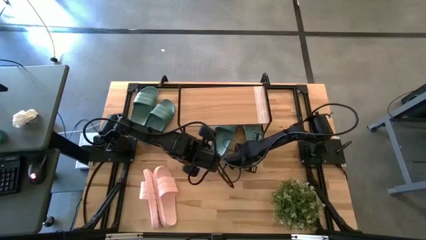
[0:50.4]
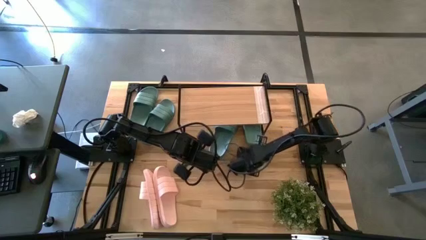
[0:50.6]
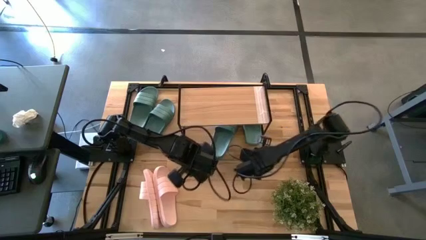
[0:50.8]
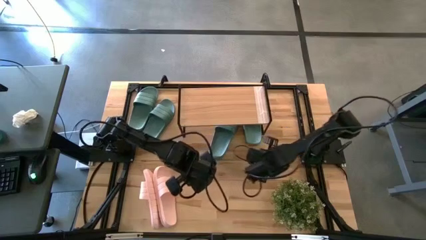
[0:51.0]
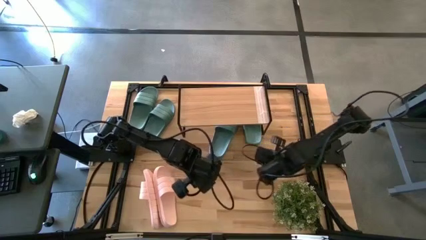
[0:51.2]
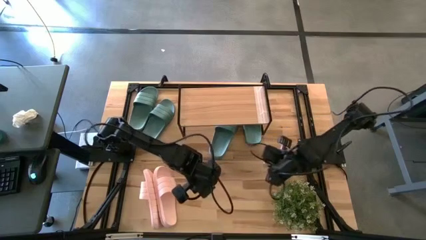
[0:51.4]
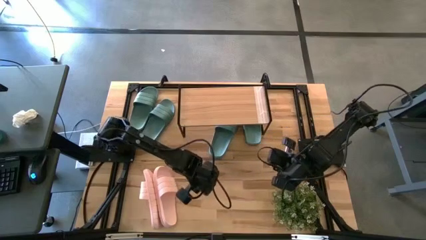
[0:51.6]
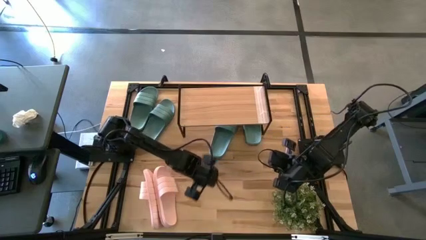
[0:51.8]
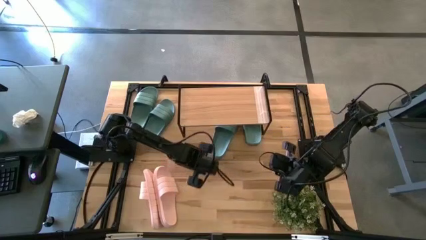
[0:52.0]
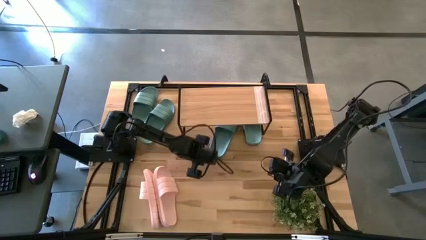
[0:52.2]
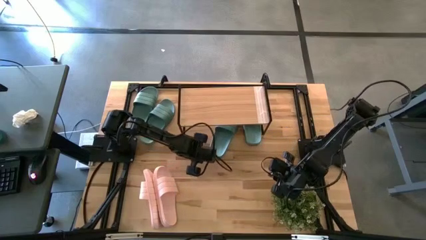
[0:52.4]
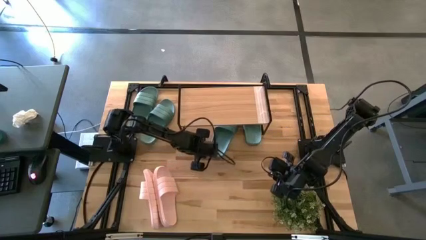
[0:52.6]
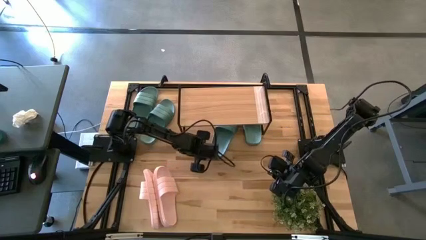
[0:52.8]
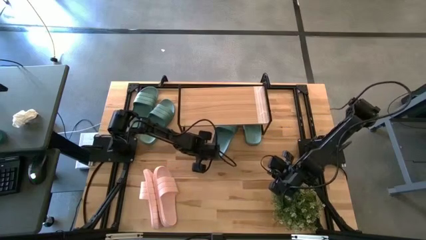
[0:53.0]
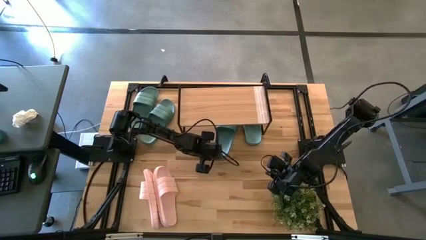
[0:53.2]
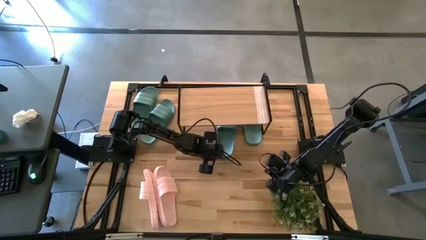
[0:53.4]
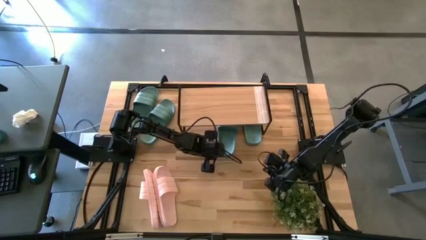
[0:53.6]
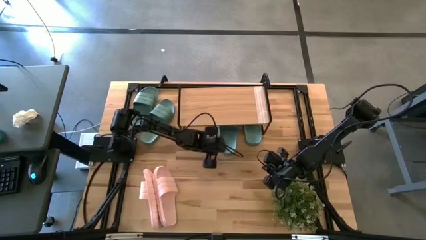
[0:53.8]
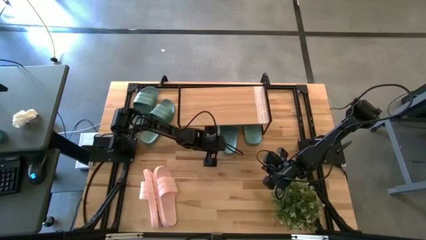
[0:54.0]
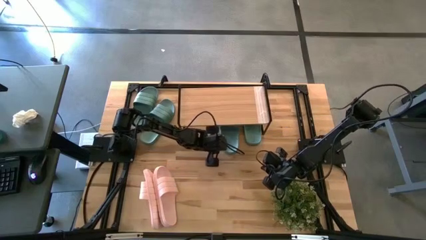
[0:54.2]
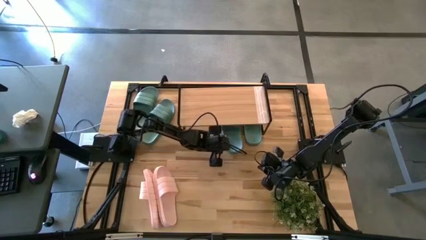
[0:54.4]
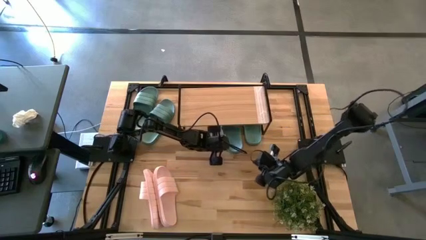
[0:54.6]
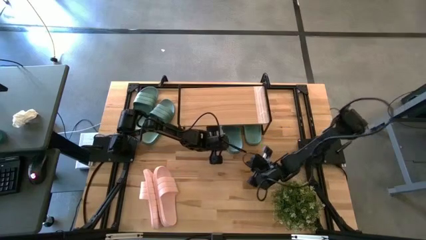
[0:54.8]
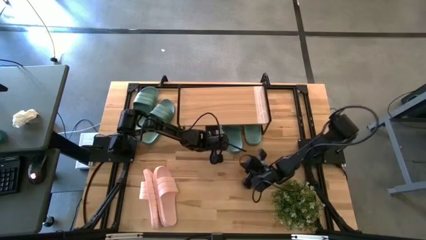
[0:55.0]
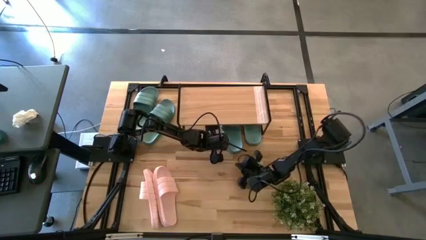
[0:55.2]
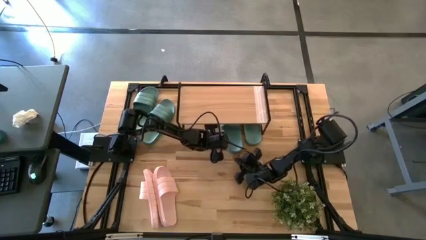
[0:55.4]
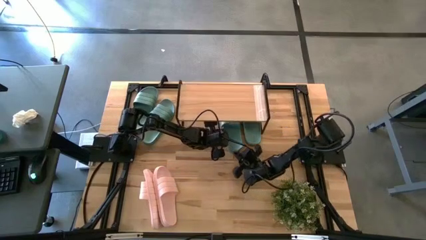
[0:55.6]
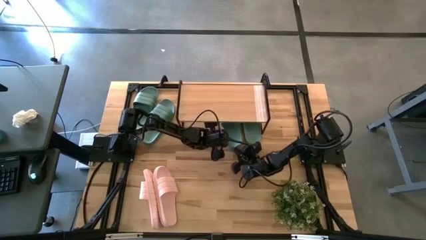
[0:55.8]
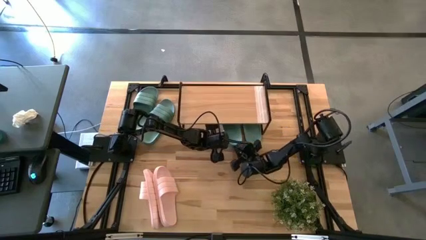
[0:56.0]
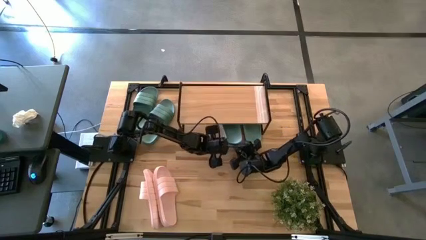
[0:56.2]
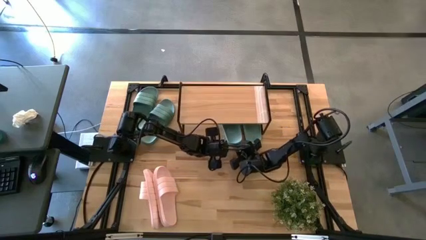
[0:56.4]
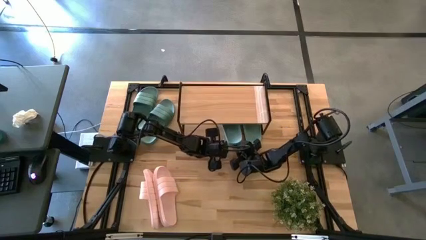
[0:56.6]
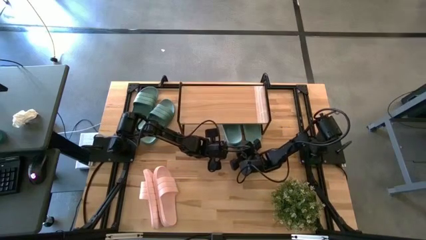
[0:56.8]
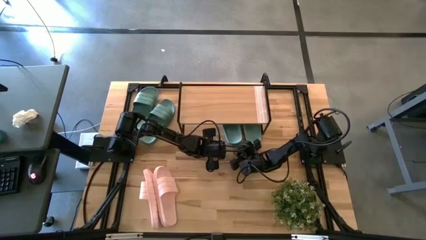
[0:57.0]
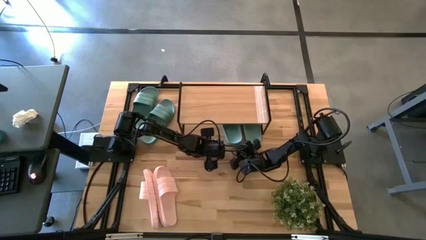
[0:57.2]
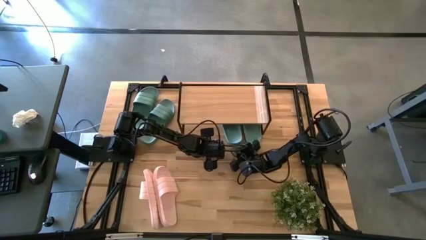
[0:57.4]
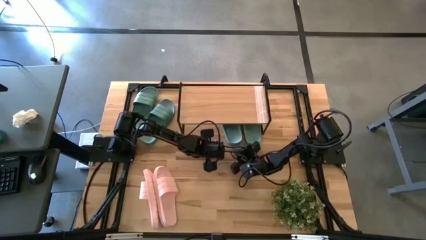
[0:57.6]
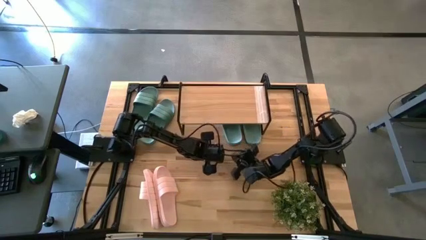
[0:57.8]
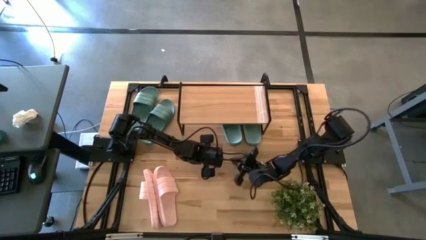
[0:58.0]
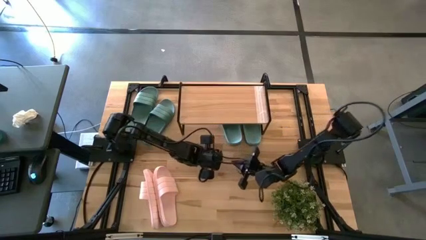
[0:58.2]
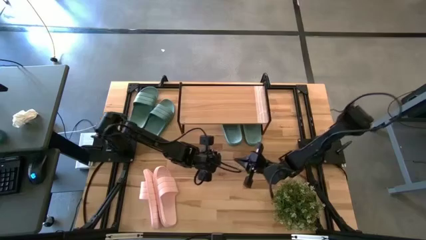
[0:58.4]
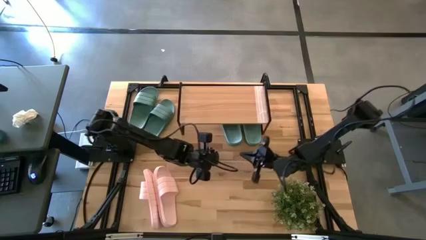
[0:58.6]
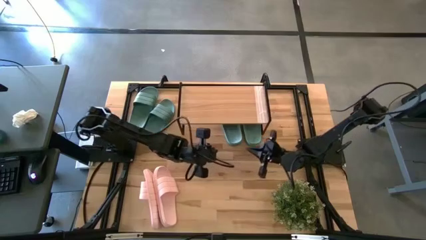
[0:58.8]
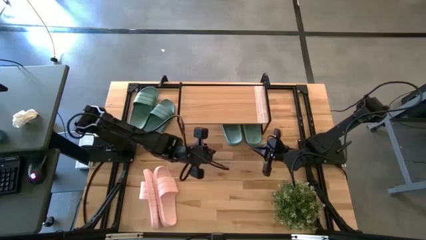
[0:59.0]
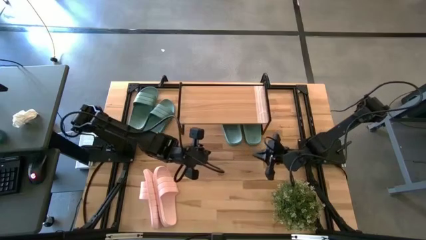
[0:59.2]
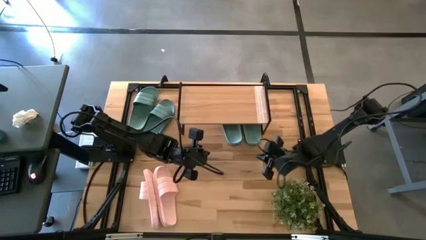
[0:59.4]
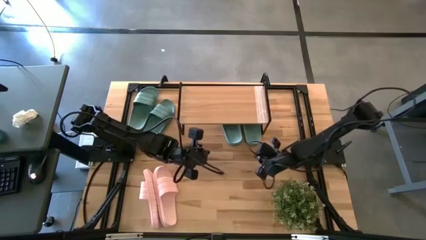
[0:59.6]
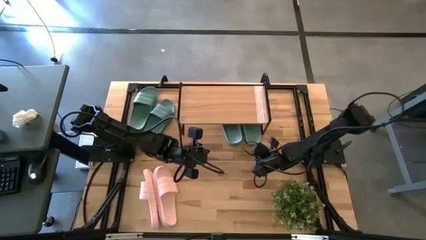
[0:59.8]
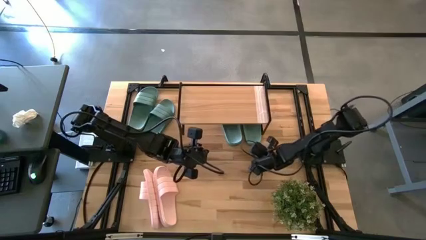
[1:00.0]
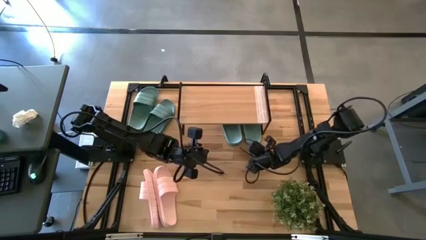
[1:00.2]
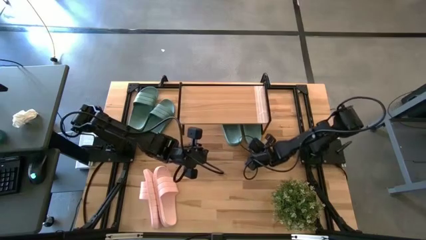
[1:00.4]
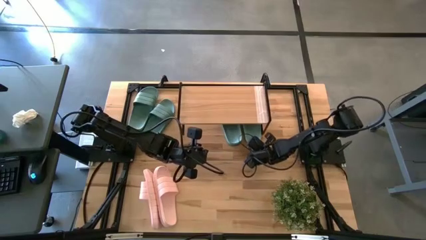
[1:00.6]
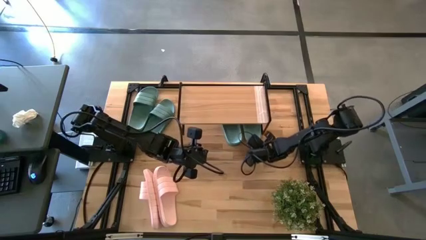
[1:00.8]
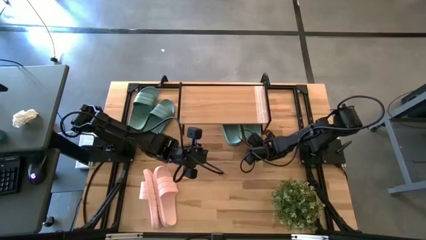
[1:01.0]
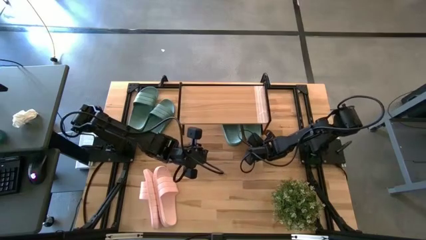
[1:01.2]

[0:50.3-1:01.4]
Task: Pick and place slides into the shelf
Adjust the green slides under the shelf
